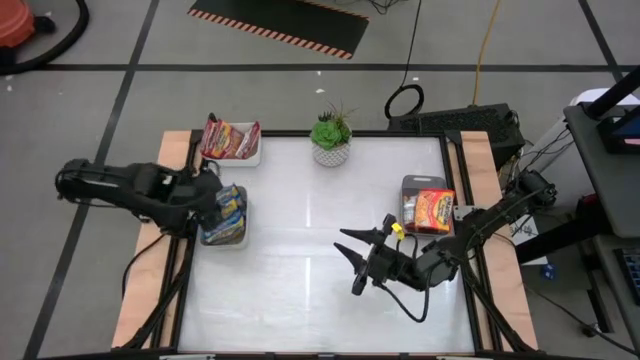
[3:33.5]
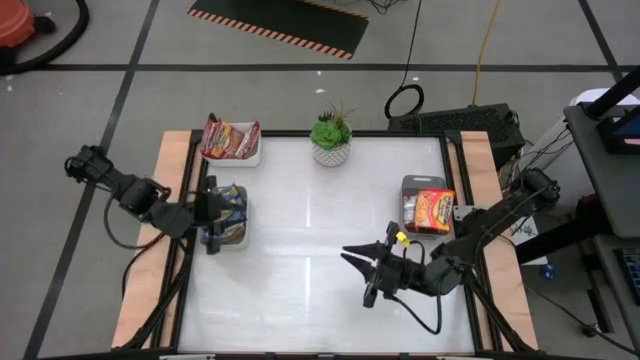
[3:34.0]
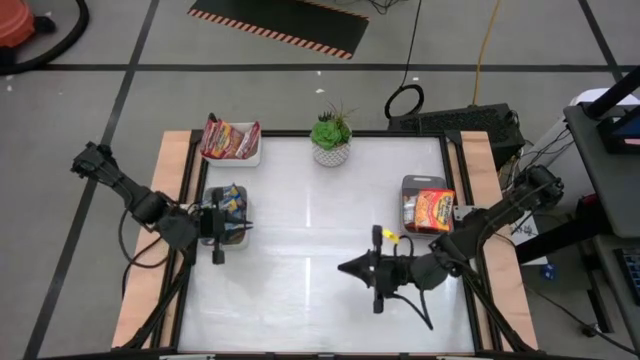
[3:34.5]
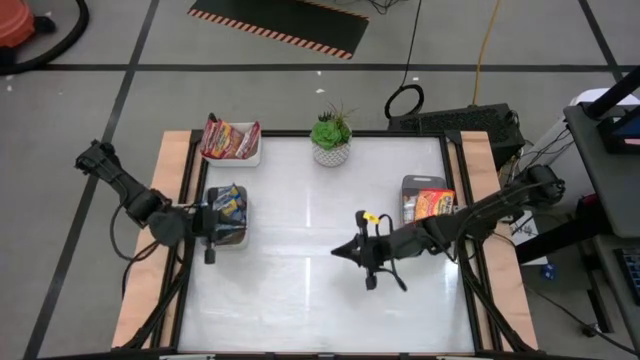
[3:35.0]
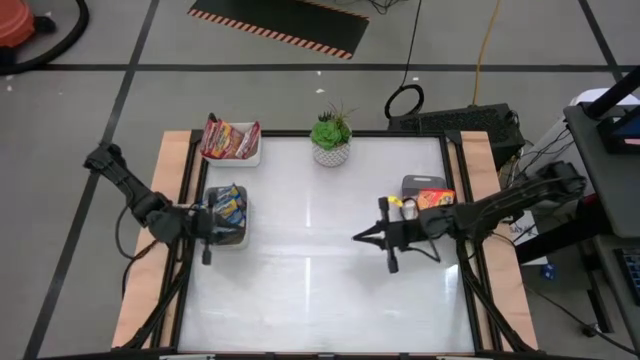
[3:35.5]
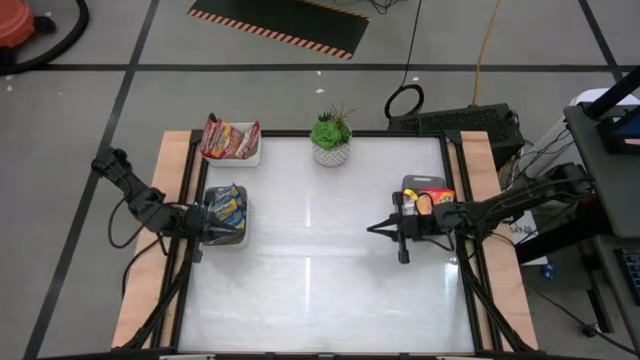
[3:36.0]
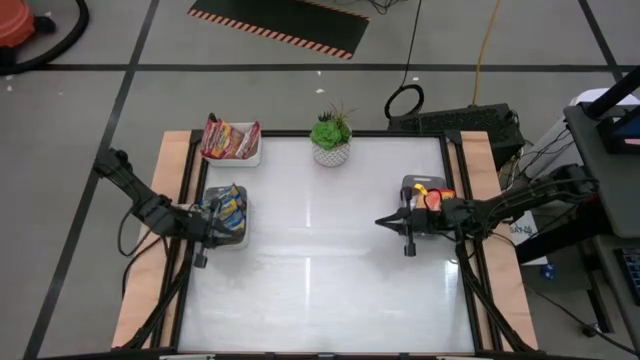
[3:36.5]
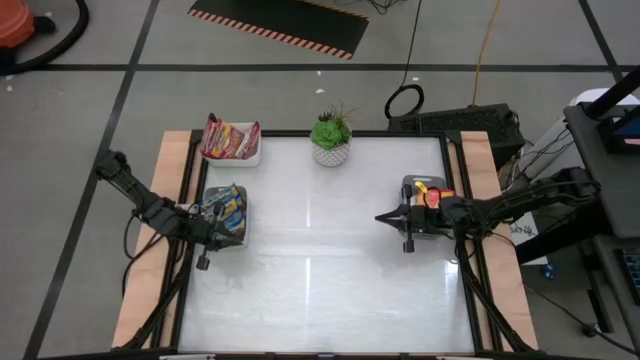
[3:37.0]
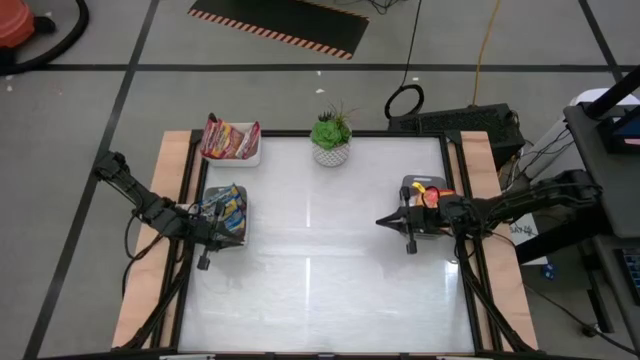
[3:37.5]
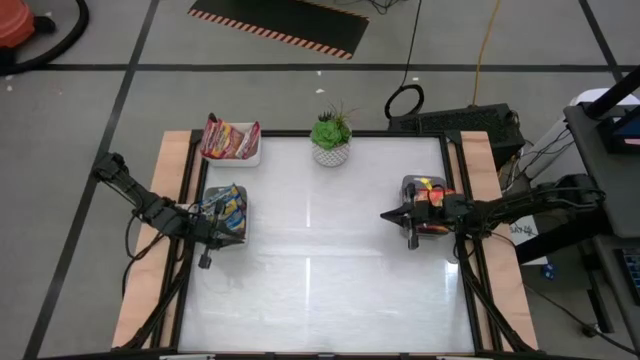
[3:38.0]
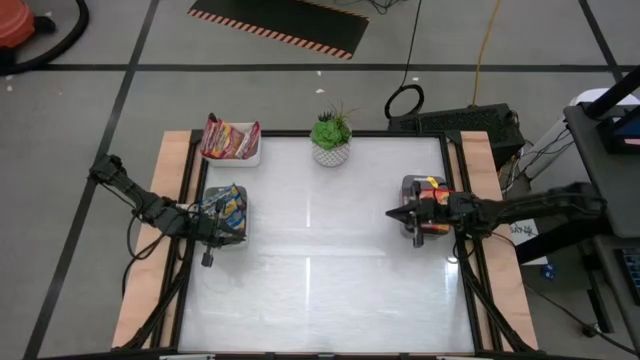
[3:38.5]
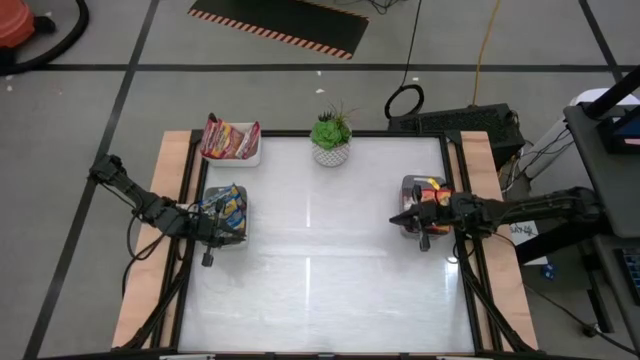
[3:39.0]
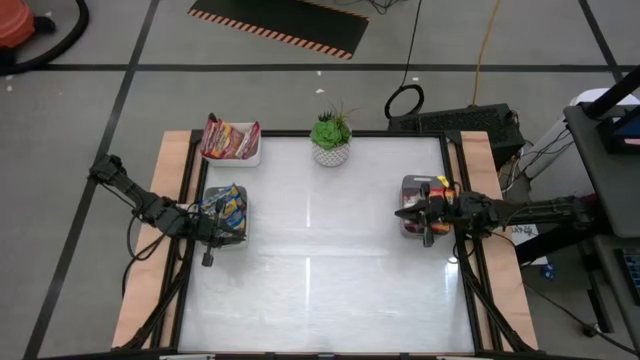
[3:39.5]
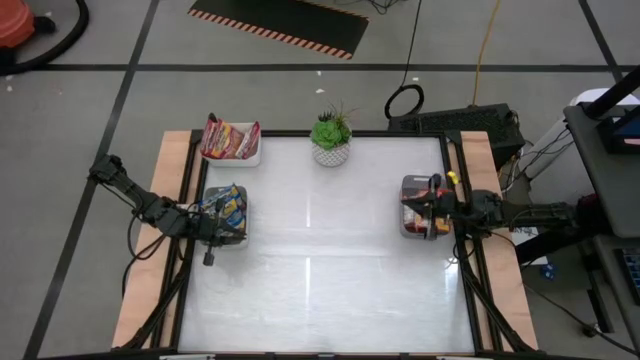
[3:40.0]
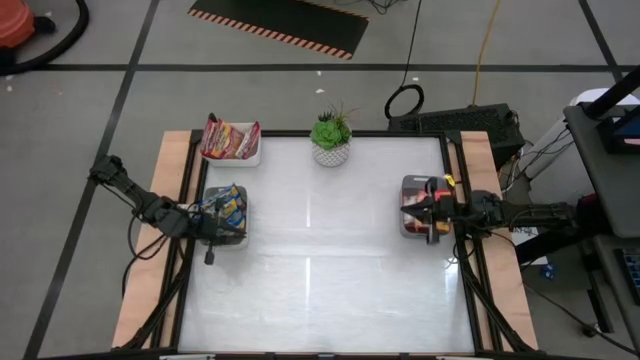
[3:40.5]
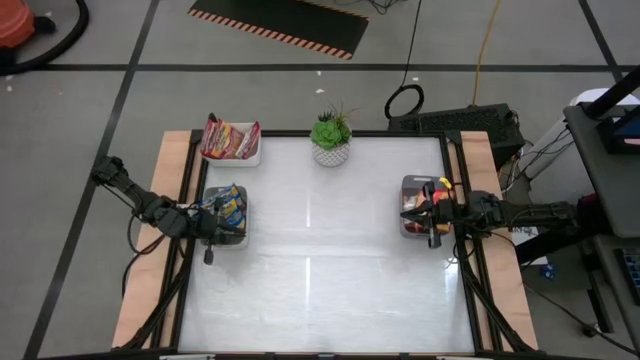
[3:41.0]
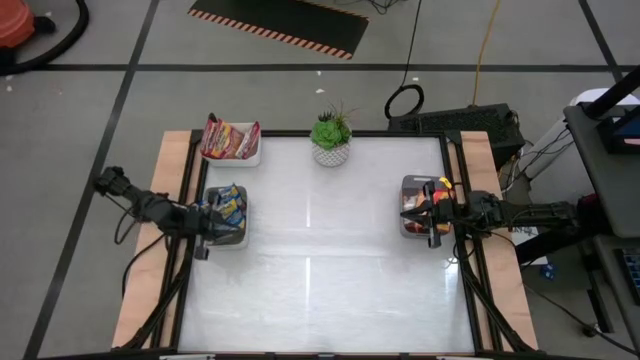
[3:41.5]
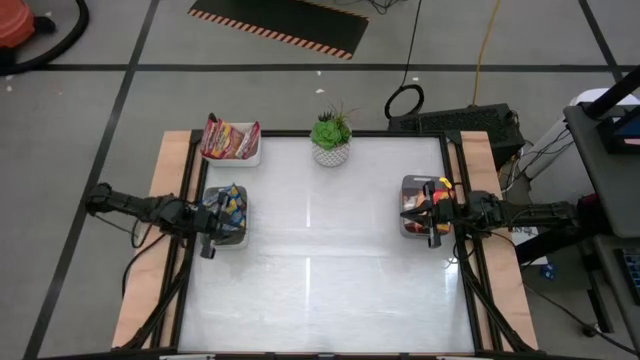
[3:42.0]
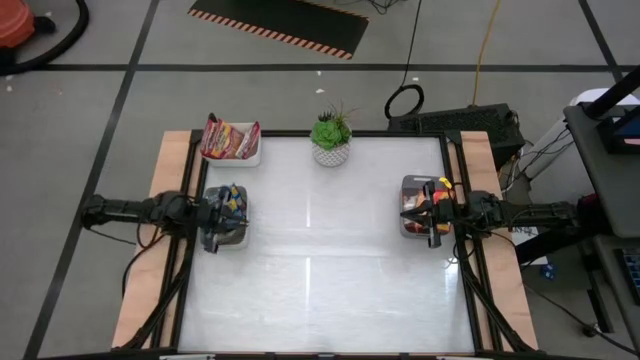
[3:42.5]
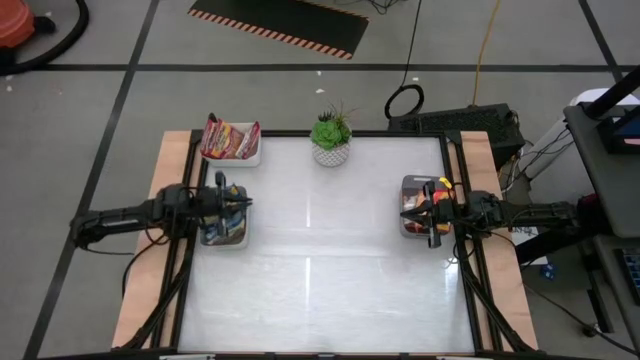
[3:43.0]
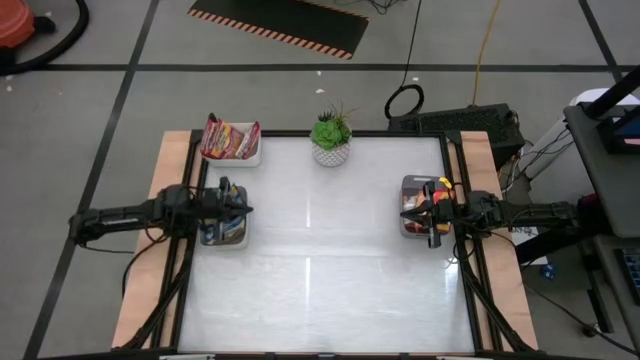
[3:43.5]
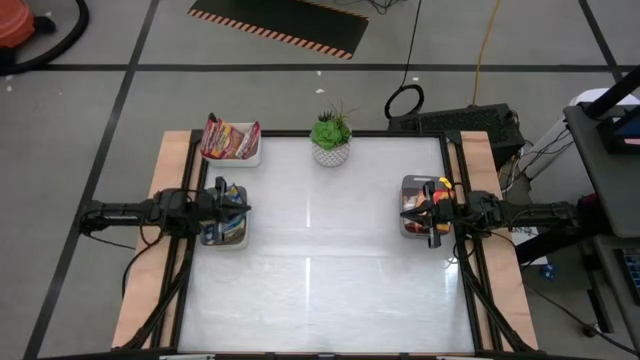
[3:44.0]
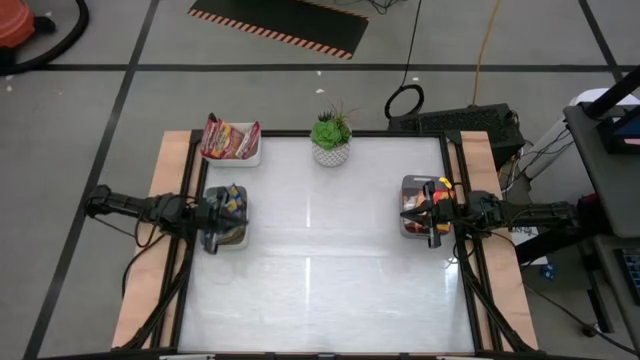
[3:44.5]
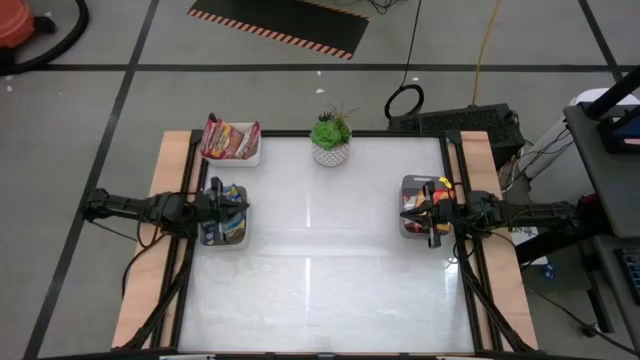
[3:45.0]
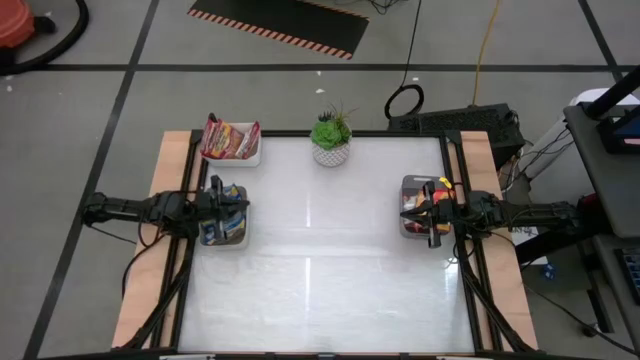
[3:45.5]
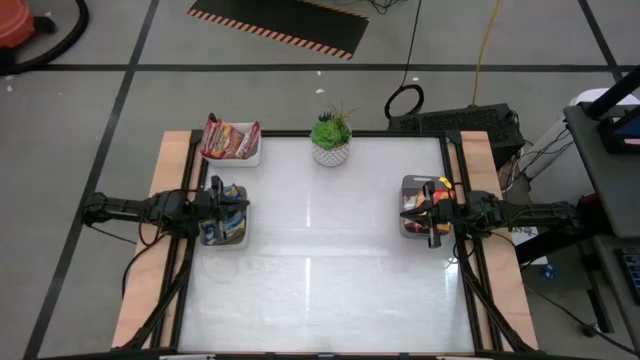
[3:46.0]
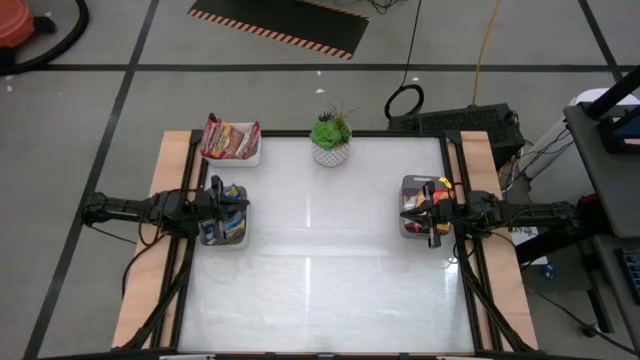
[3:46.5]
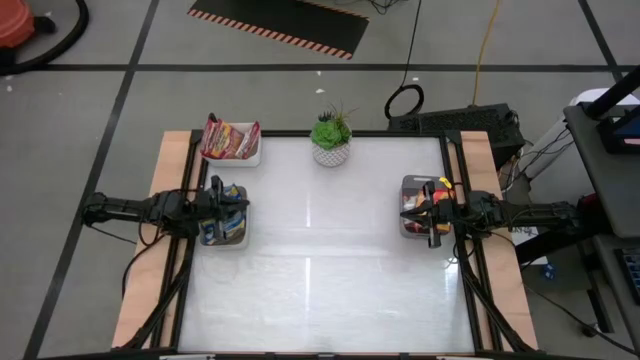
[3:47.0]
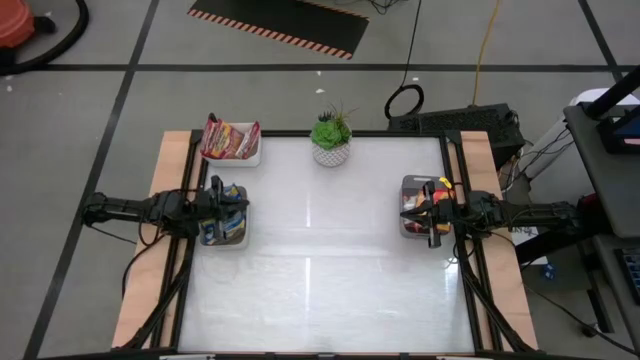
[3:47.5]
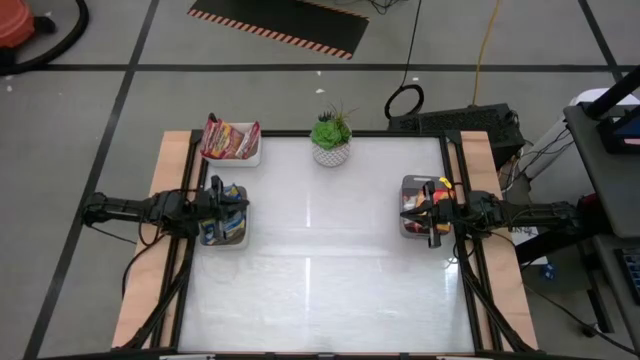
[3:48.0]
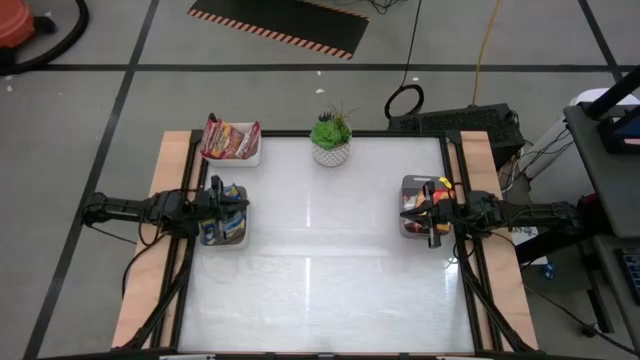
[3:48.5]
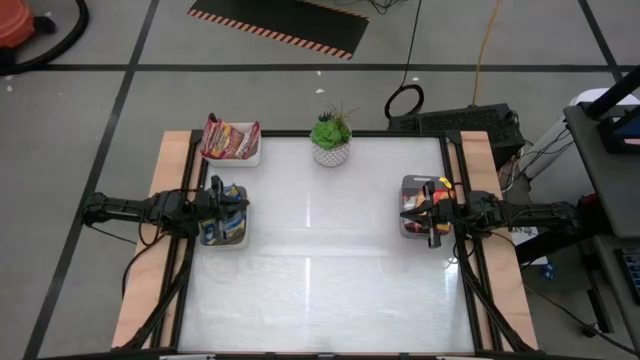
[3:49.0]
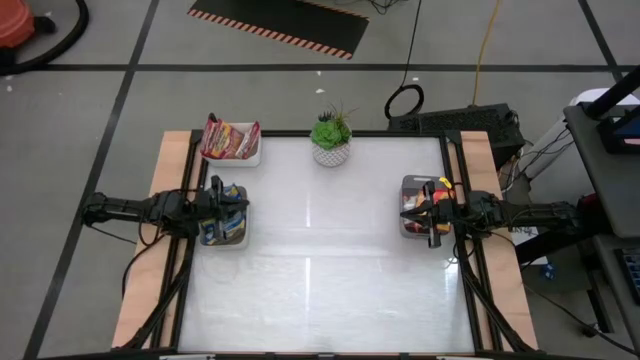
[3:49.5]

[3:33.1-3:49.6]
Task: Sort Maruchan noodles
Return to Home Position

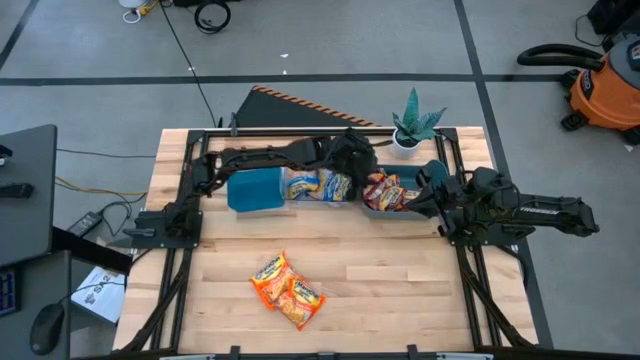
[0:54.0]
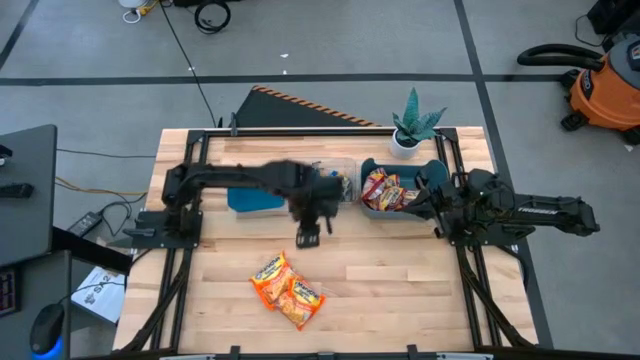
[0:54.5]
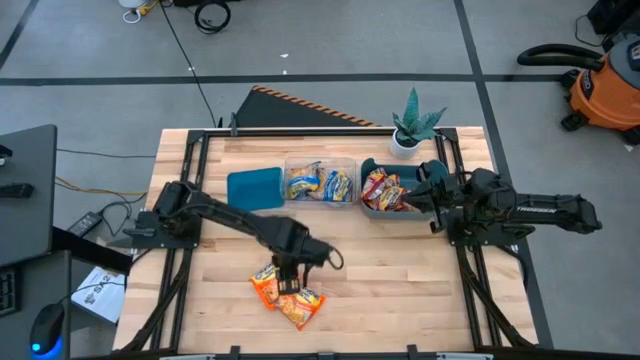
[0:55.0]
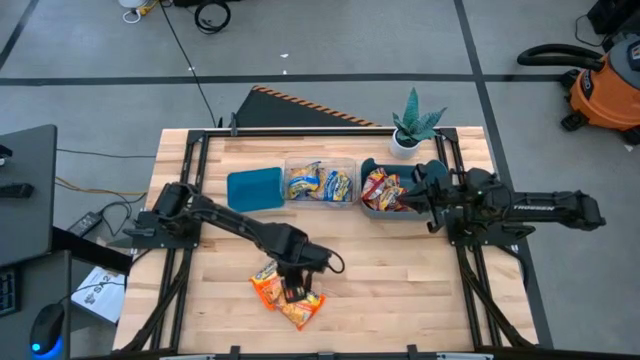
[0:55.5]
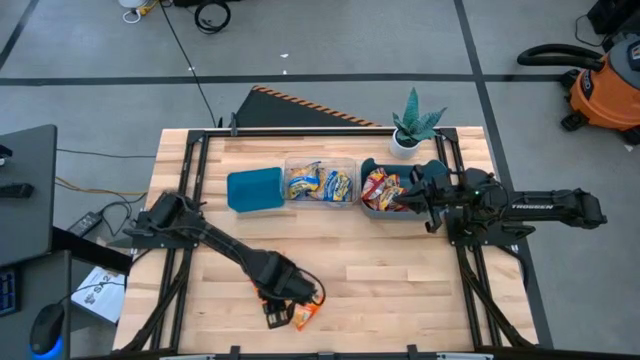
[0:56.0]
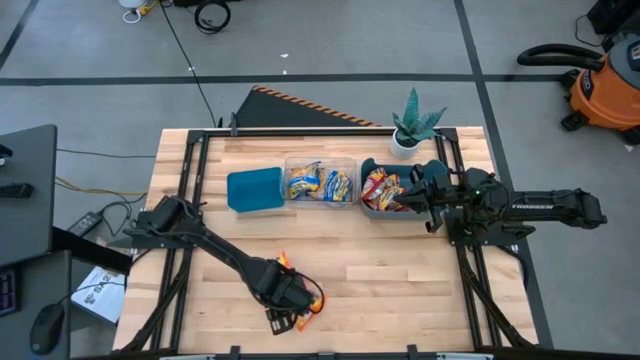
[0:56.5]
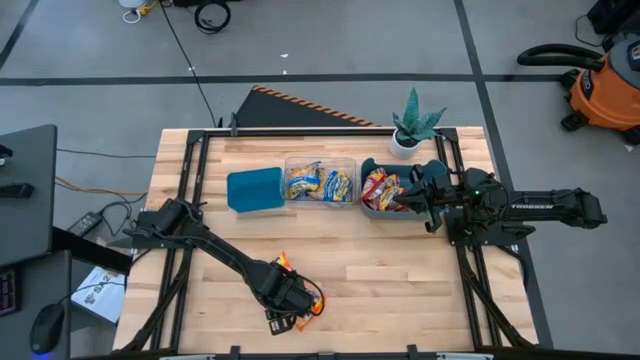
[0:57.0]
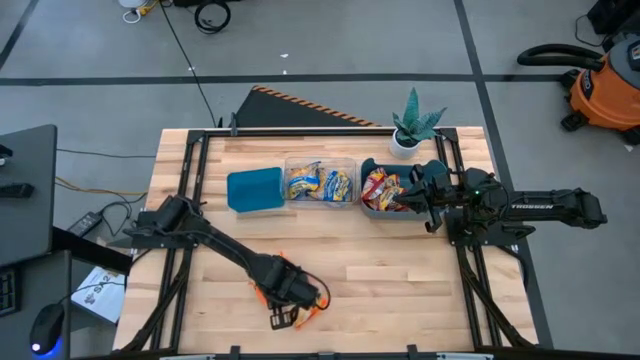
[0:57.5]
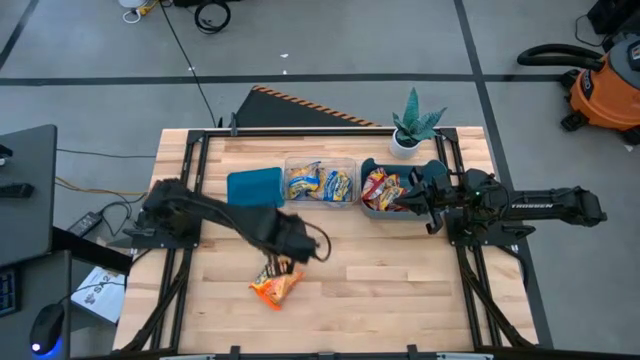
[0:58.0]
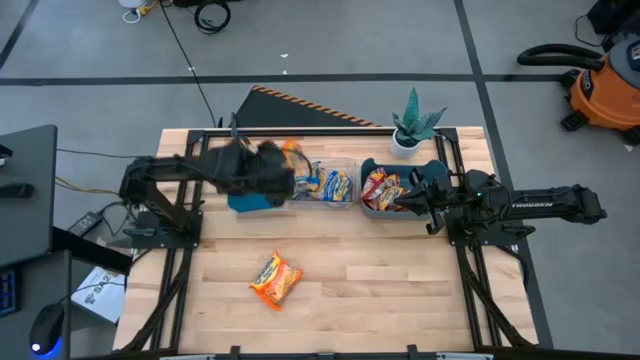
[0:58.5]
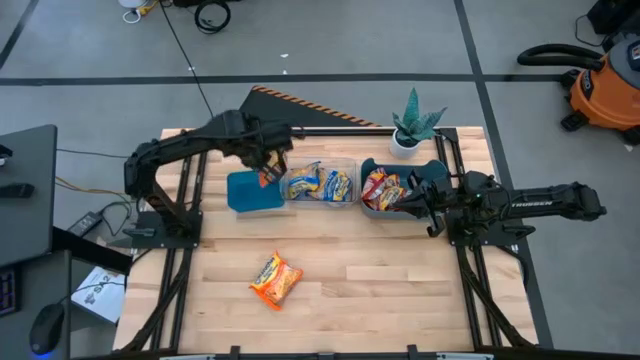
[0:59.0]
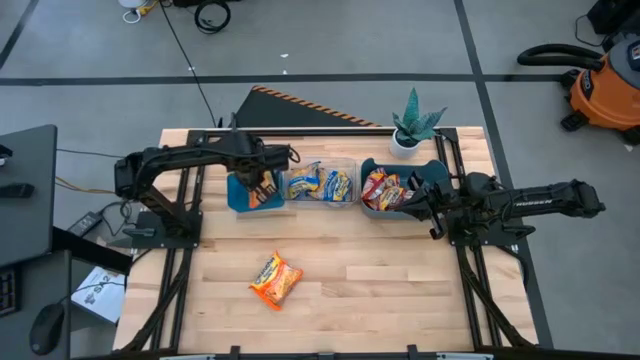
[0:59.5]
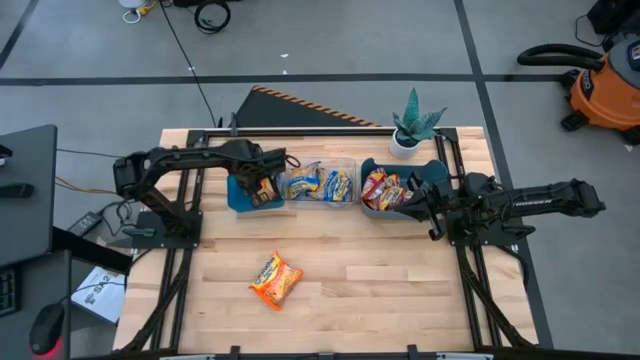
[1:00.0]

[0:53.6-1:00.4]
Task: Sort Maruchan noodles
Put the bottom orange noddle pack into the blue bin
